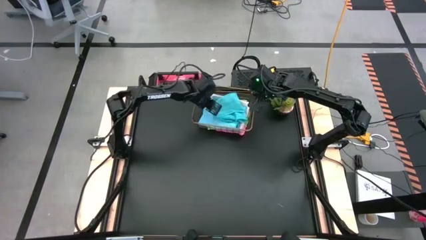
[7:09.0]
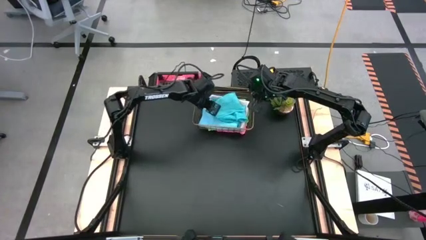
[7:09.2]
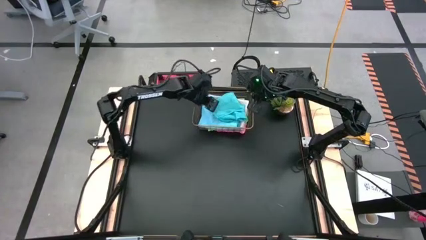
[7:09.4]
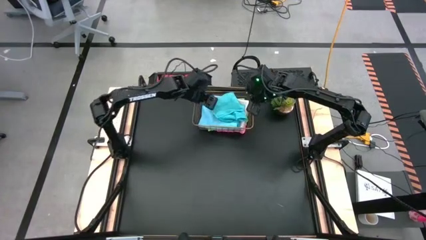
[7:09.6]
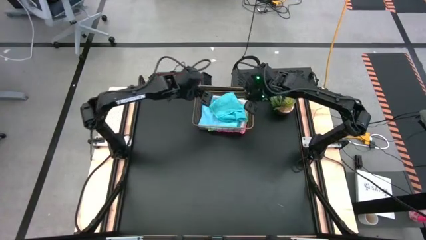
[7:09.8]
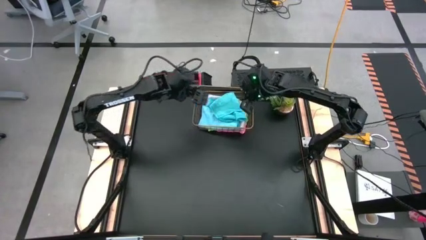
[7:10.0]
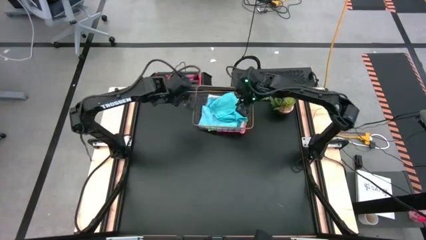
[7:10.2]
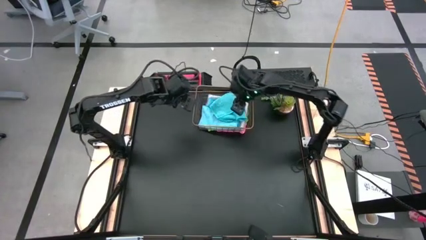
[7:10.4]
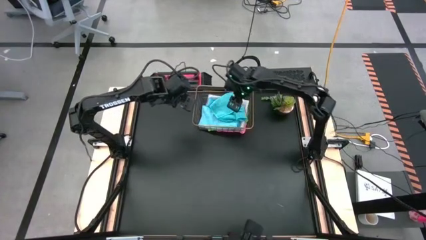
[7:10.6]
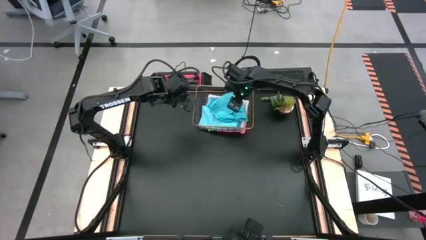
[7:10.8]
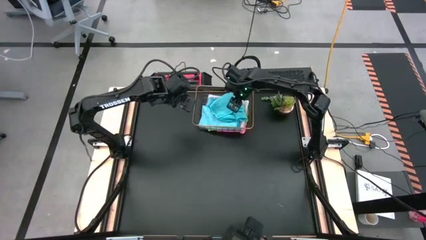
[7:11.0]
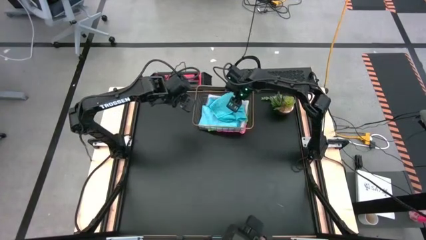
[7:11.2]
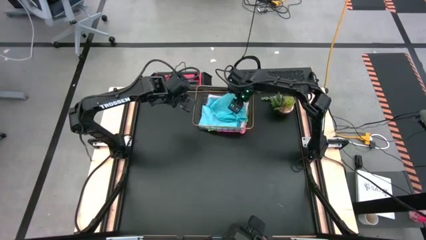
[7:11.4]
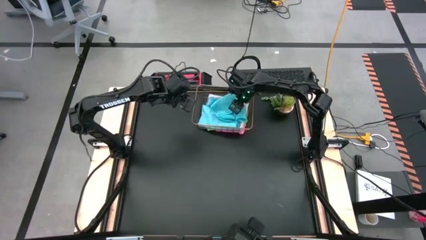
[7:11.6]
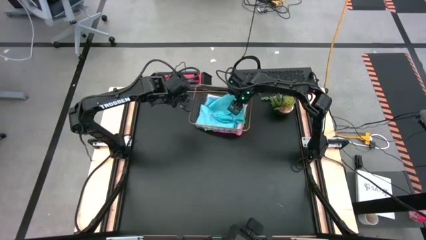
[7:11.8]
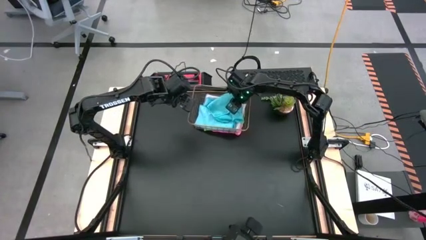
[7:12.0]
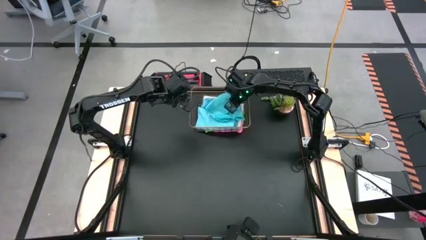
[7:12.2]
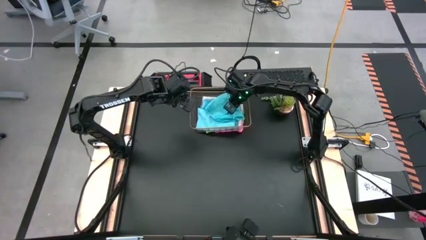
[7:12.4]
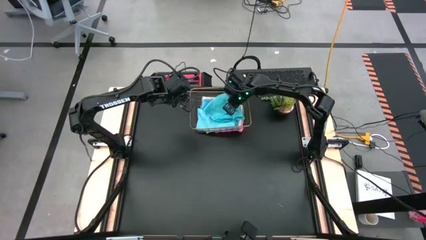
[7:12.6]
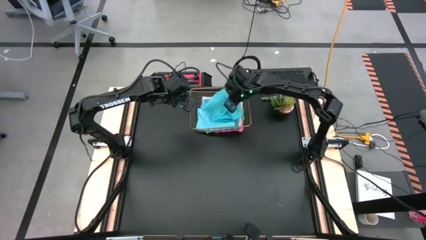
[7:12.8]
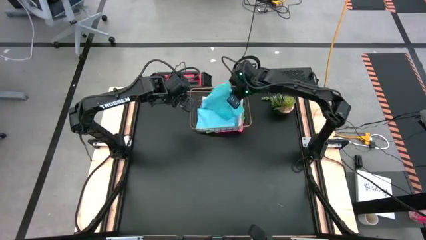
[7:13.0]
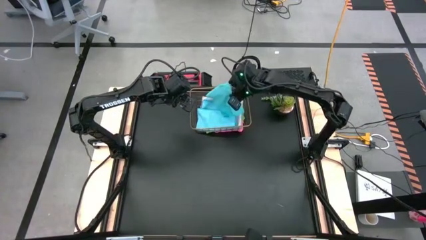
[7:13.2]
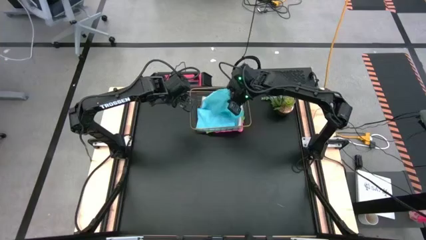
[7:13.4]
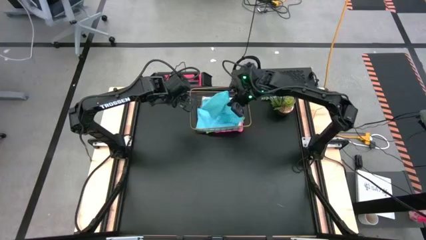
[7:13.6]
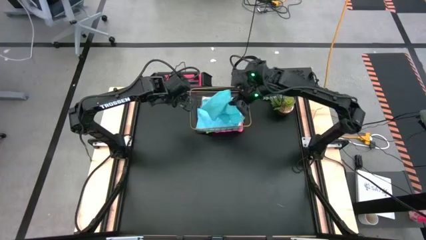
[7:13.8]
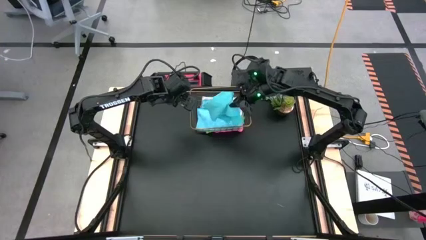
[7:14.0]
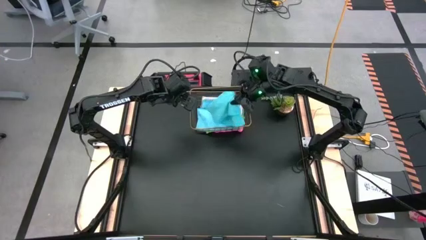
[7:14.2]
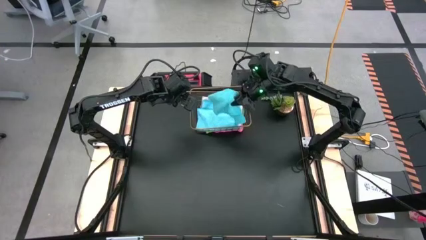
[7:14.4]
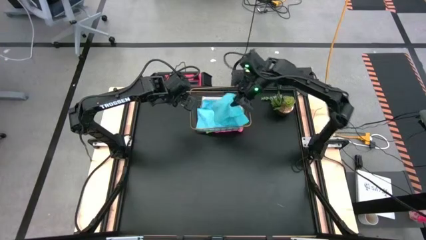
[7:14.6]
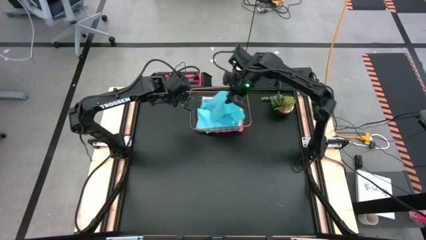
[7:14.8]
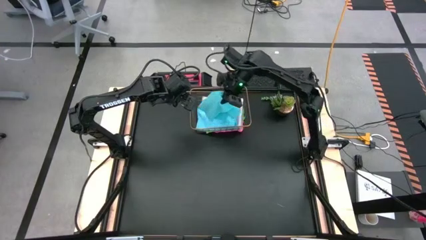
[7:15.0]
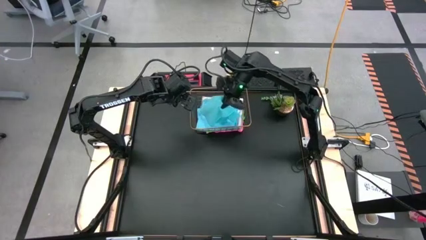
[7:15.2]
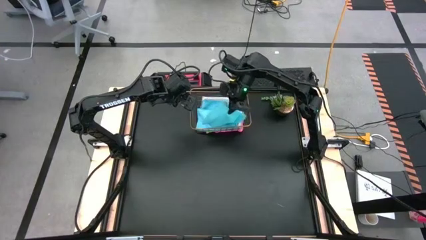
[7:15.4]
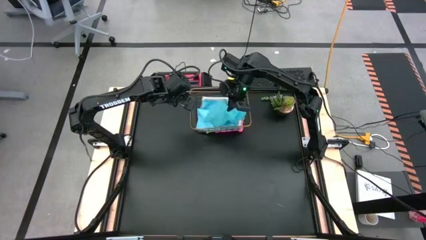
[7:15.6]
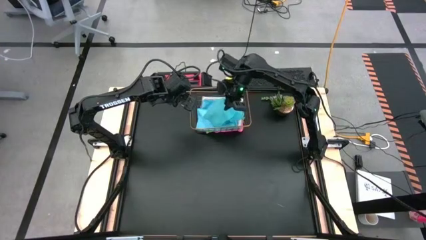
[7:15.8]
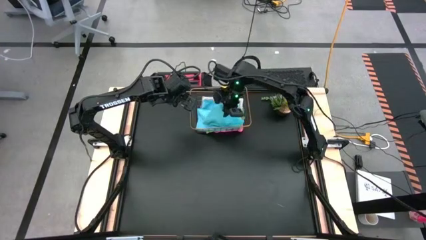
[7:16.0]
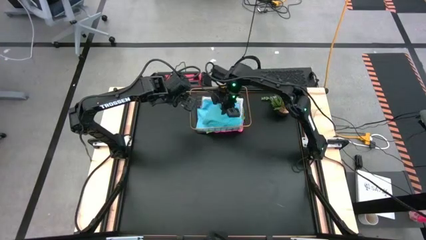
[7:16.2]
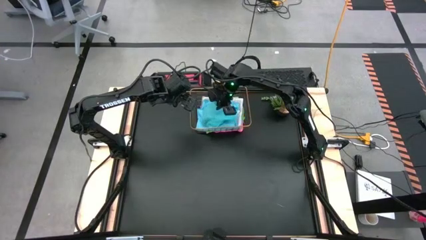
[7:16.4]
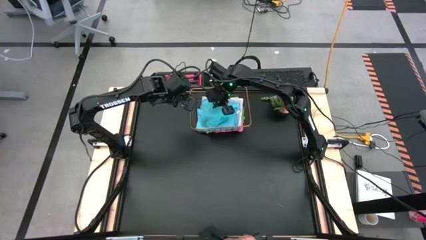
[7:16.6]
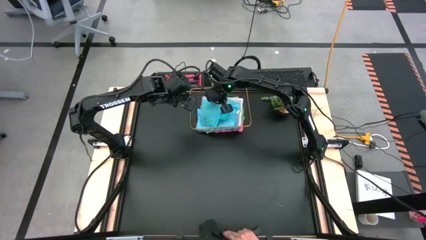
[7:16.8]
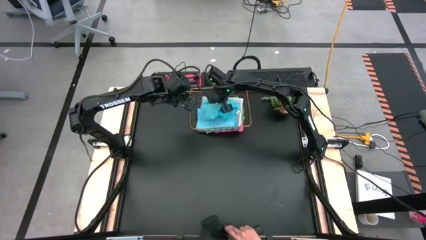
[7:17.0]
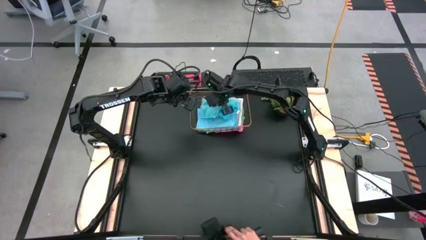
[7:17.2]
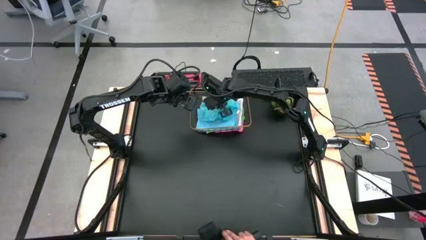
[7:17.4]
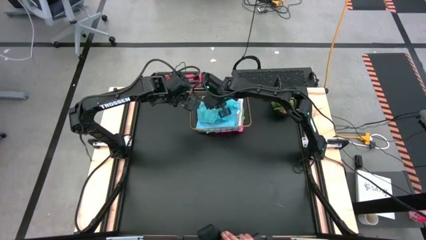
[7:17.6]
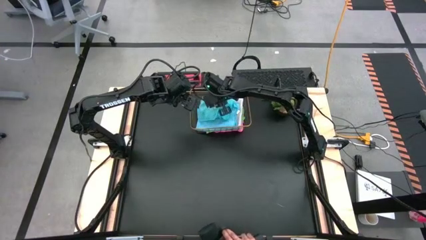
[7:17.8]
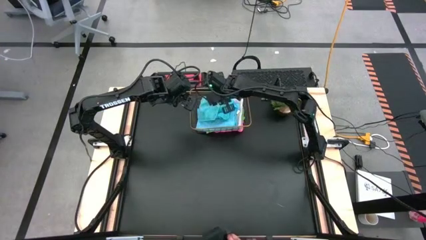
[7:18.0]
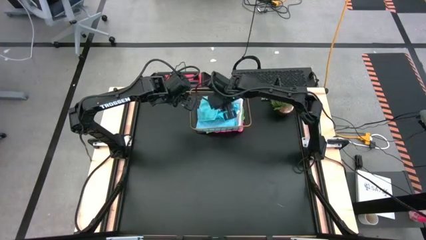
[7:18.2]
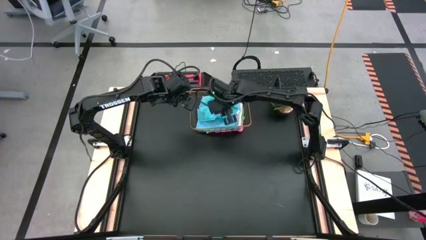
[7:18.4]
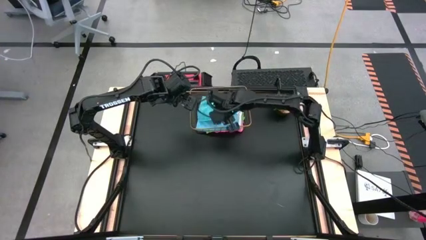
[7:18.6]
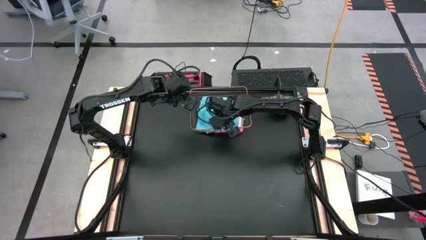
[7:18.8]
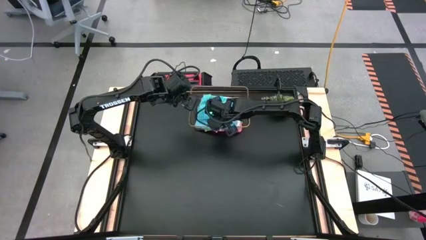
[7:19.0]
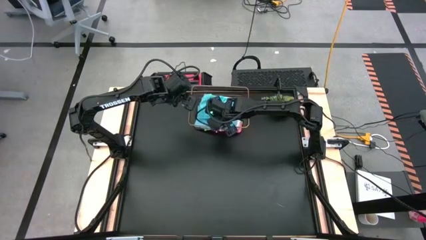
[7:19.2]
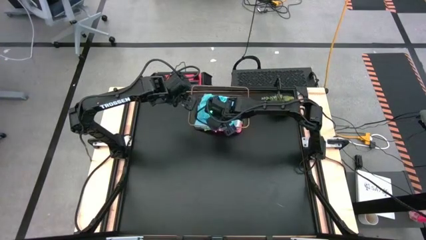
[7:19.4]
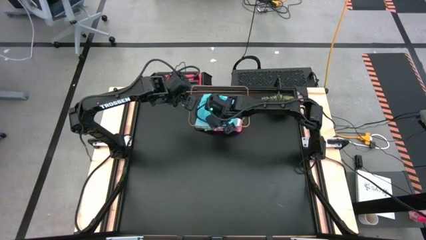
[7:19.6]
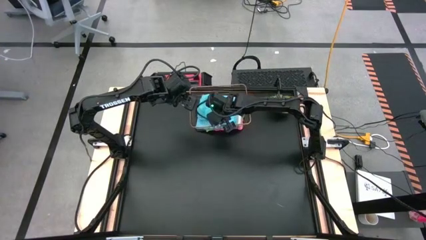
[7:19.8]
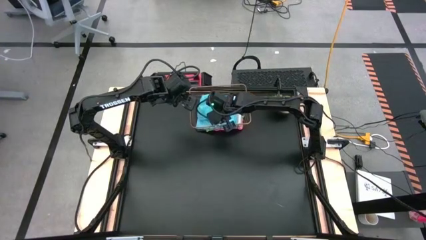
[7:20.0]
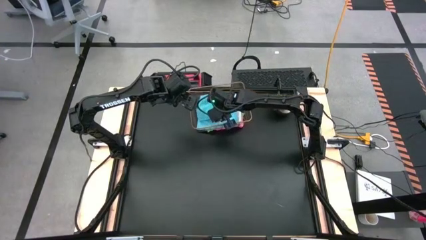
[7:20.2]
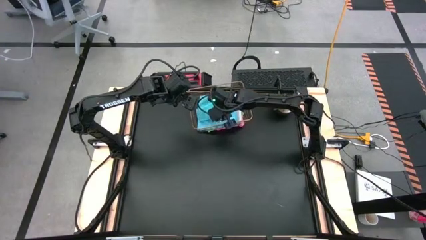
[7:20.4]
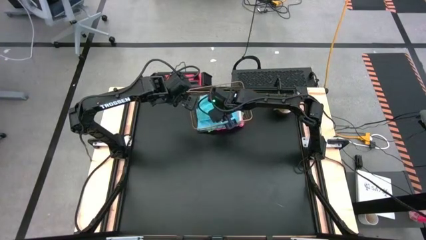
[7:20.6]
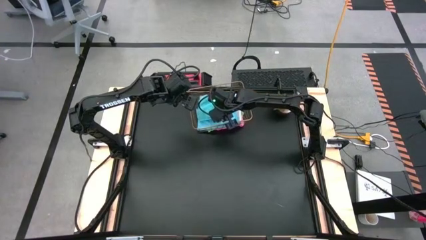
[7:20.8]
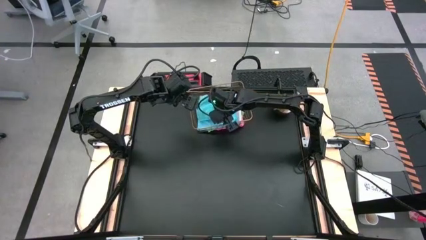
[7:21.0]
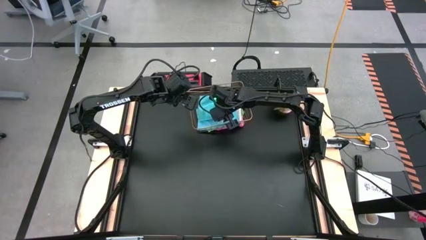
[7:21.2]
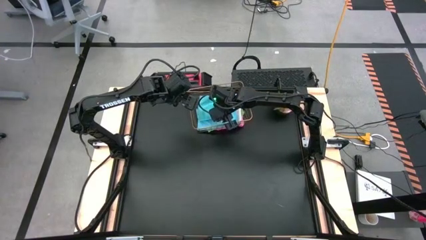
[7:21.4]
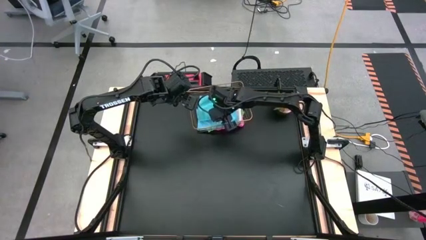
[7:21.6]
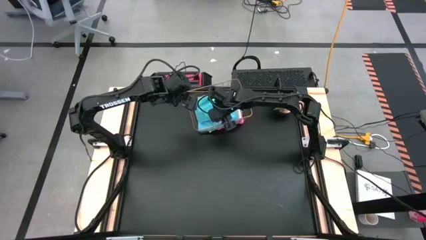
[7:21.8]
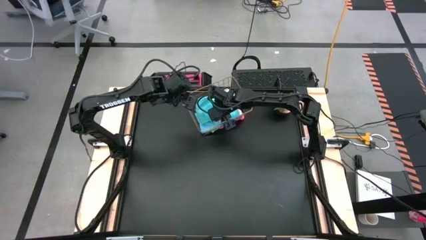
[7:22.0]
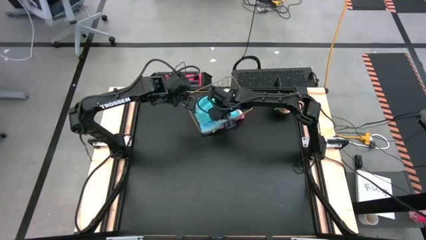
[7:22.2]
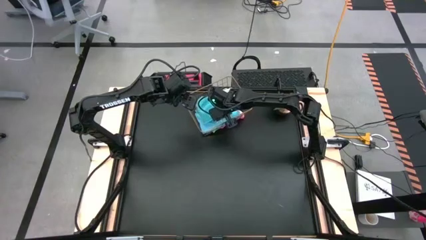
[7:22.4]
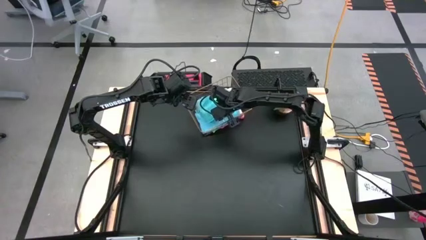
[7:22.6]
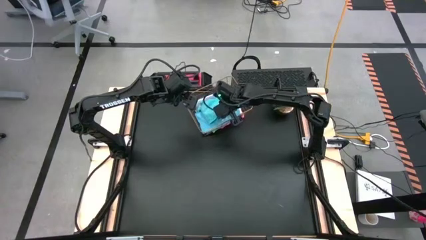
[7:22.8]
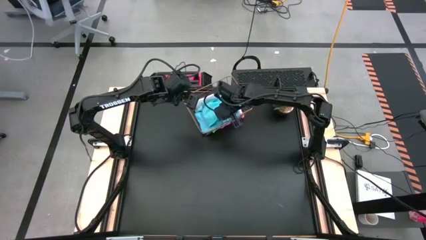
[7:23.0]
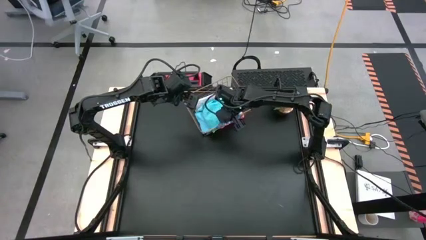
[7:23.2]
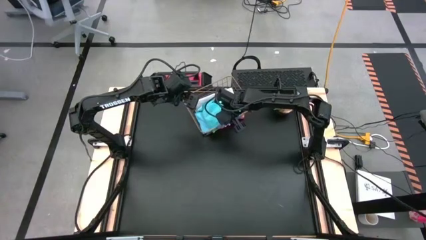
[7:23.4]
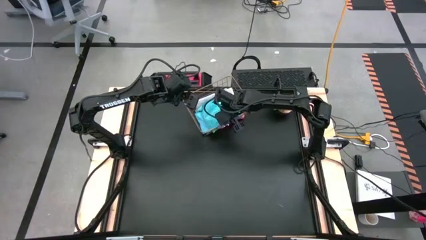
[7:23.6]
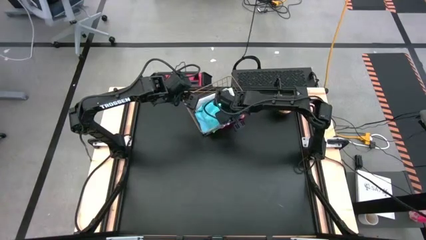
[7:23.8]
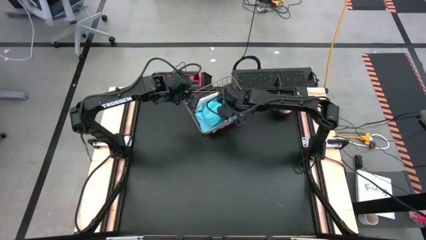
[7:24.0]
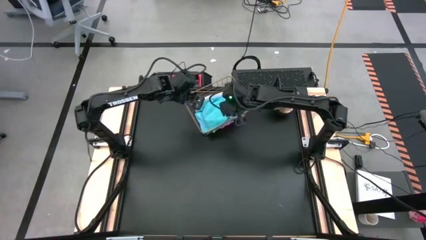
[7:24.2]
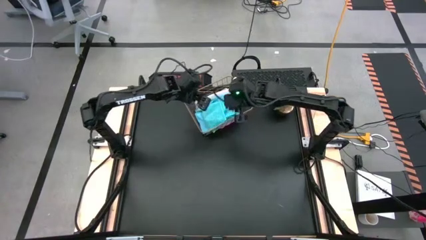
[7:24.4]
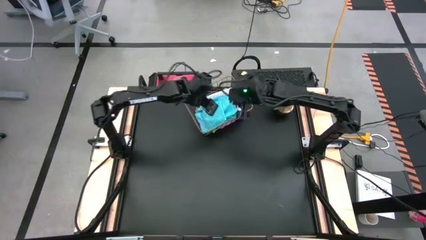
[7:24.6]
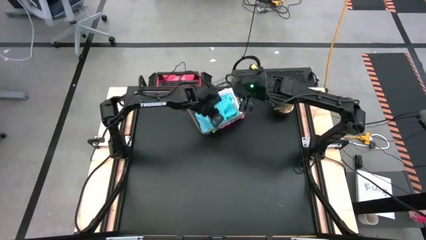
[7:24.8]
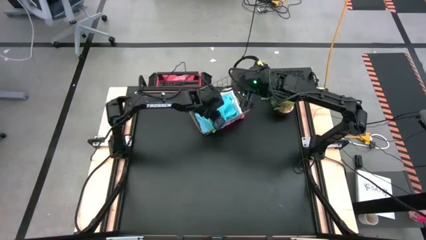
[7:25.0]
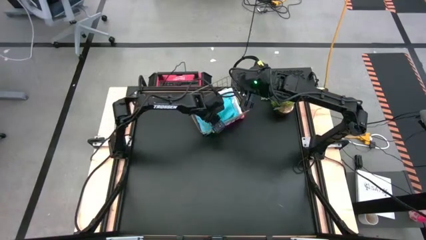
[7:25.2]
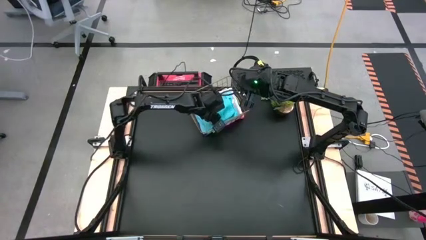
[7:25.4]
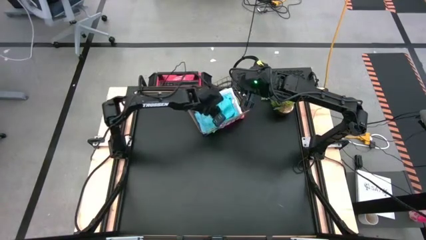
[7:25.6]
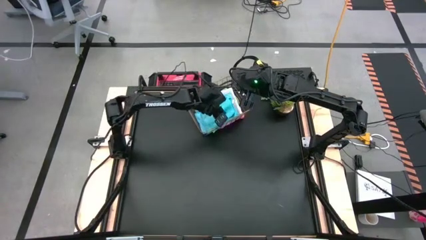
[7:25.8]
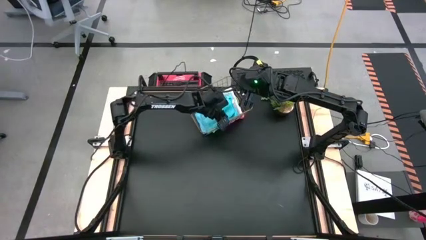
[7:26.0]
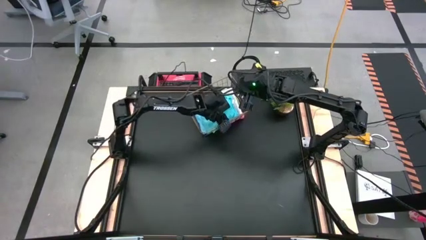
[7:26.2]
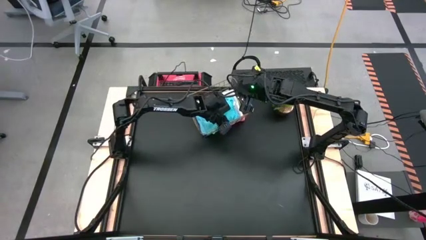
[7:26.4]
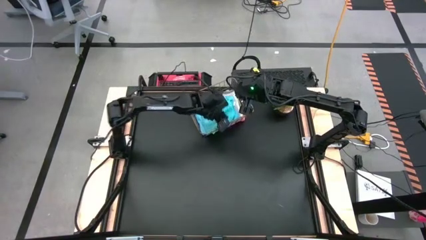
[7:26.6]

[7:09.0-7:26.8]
Task: Fold microfiber towels
Stack the folded light blue microfiber cloth on top of the folded light blue microfiber cloth in the wire basket
